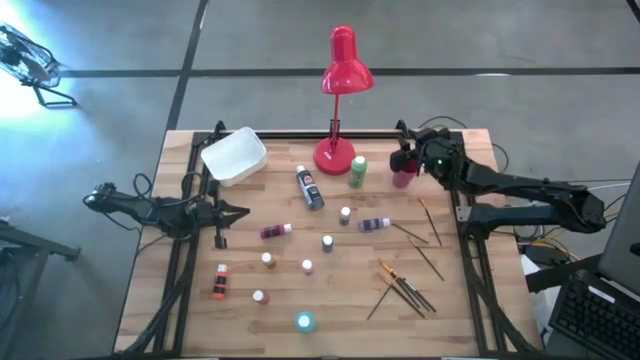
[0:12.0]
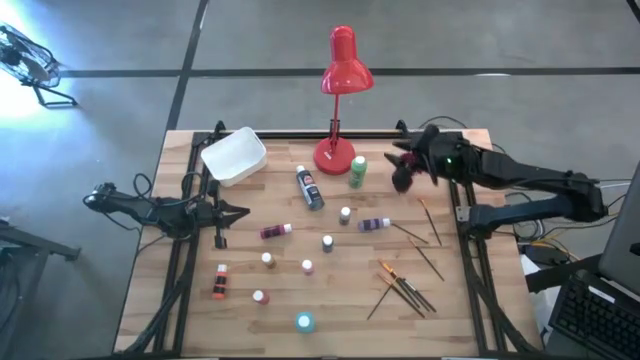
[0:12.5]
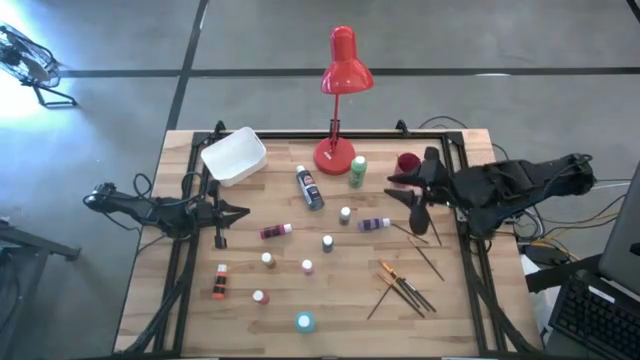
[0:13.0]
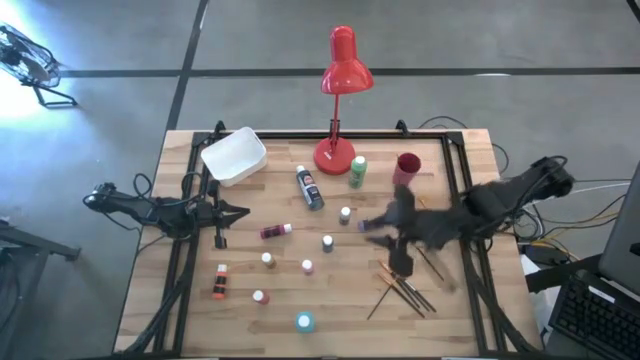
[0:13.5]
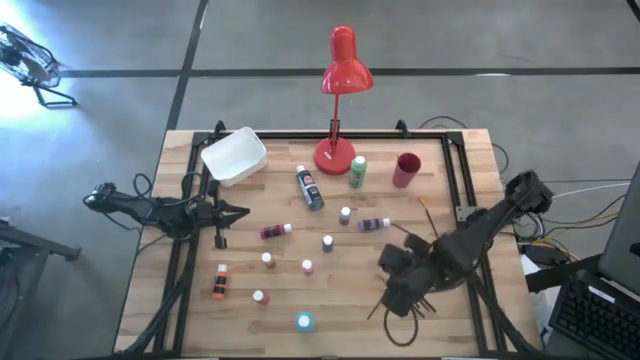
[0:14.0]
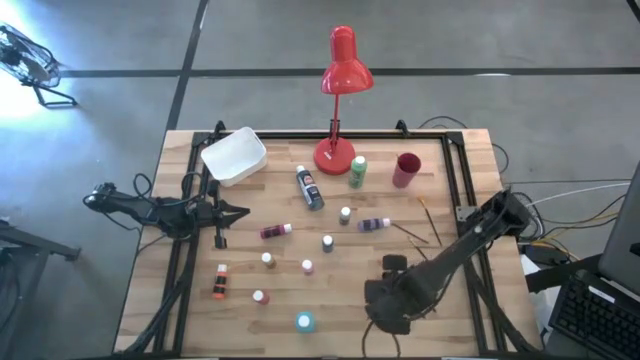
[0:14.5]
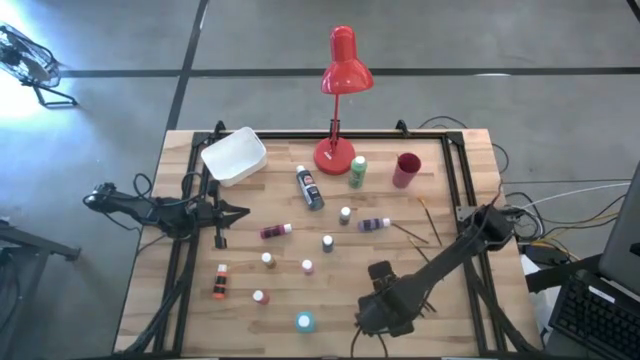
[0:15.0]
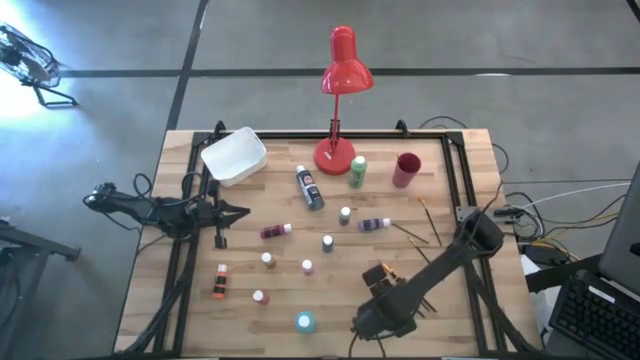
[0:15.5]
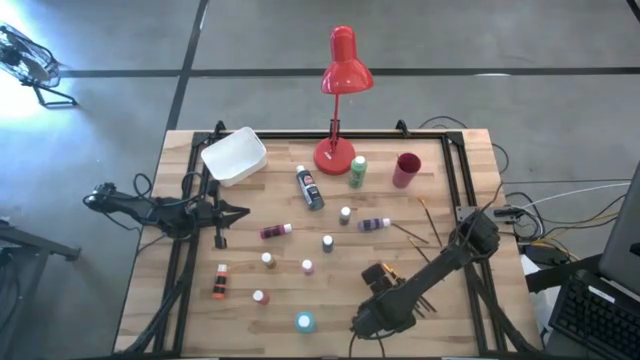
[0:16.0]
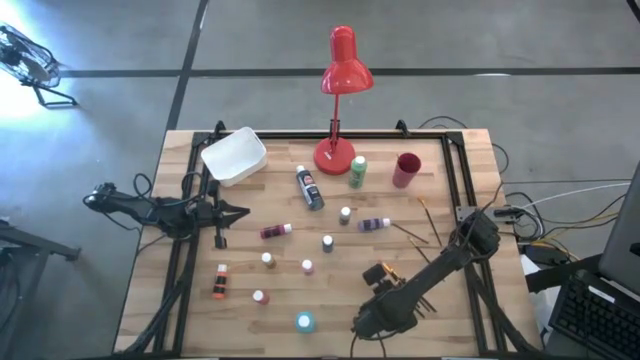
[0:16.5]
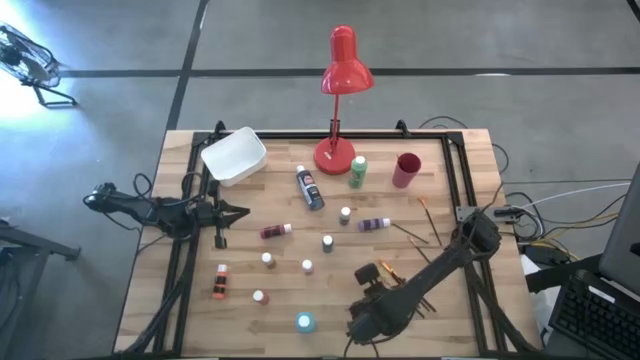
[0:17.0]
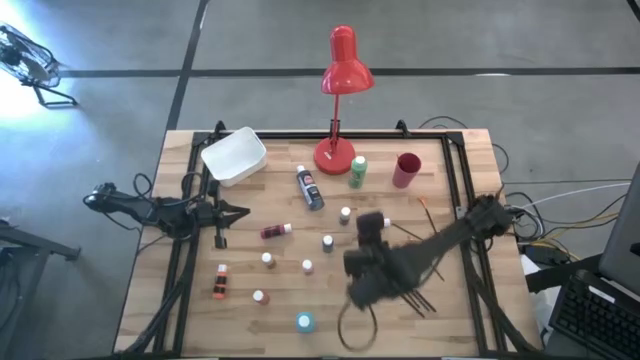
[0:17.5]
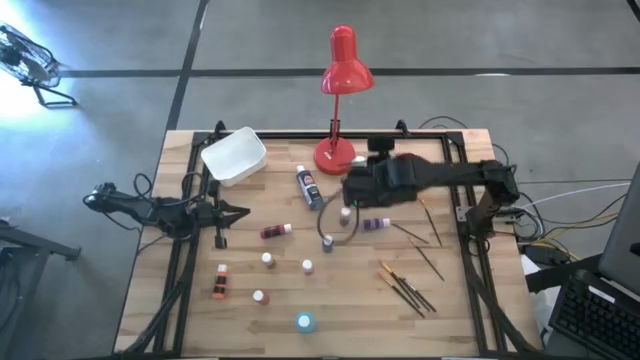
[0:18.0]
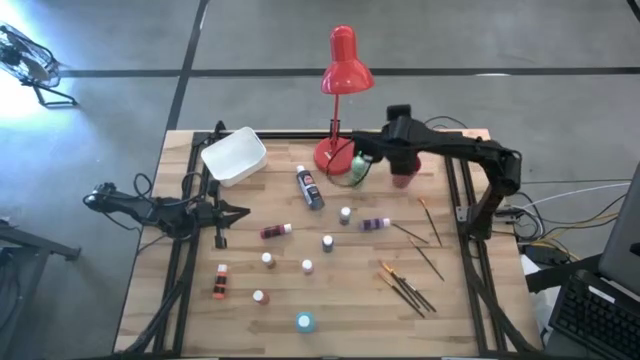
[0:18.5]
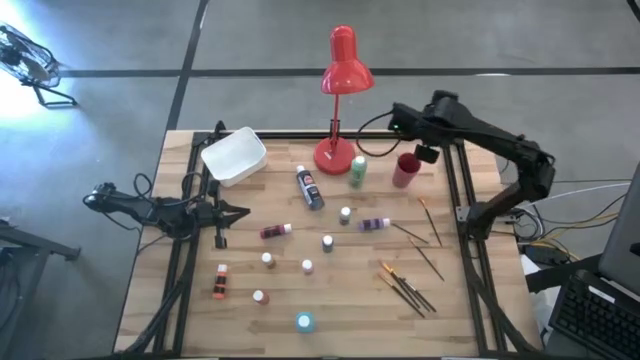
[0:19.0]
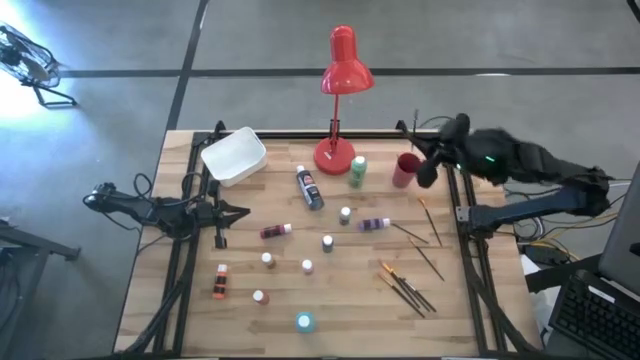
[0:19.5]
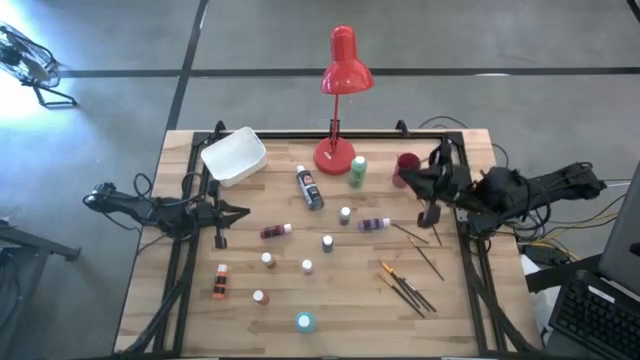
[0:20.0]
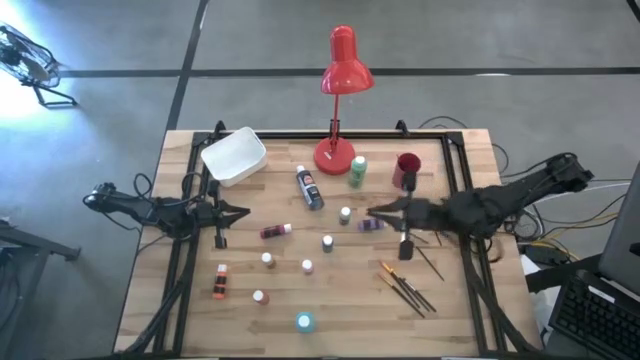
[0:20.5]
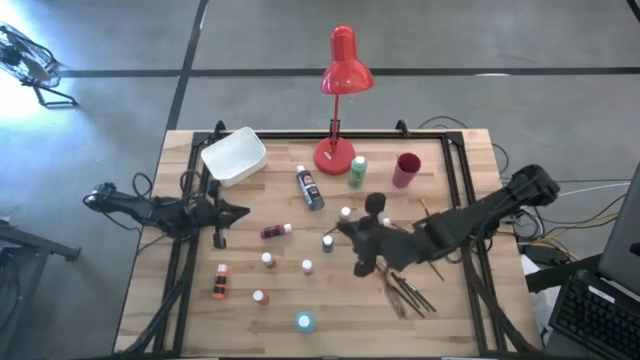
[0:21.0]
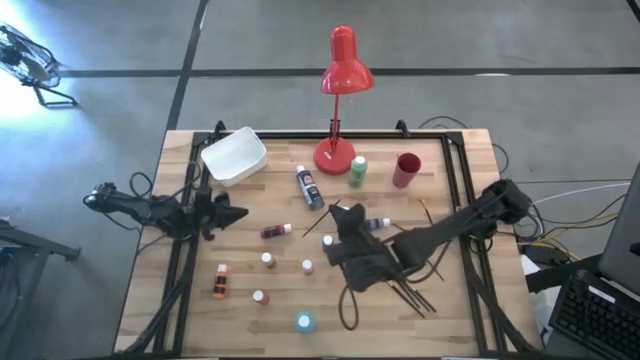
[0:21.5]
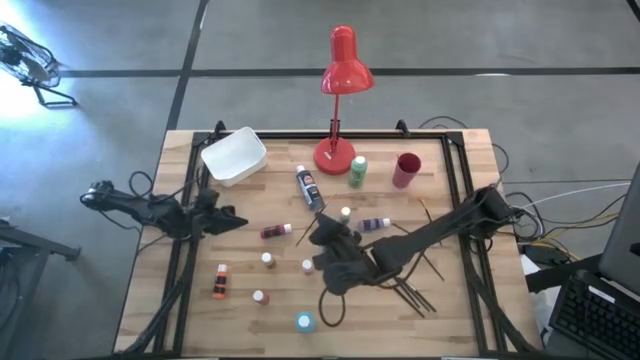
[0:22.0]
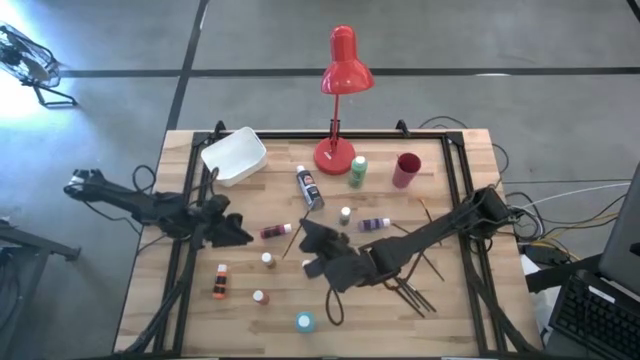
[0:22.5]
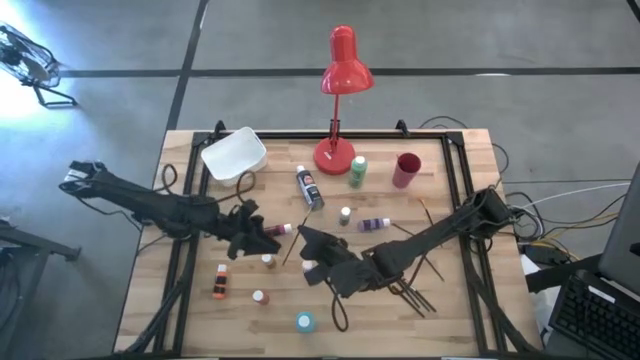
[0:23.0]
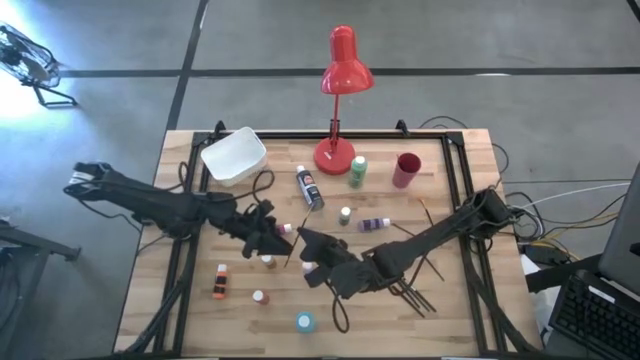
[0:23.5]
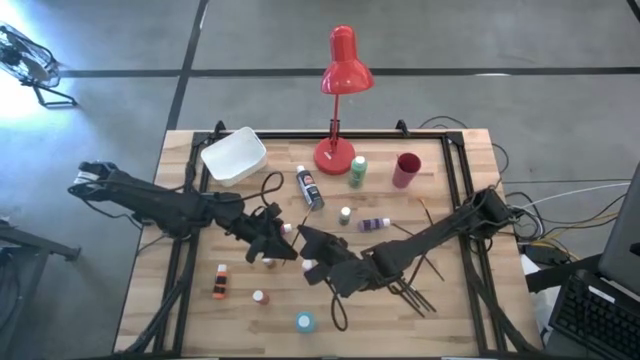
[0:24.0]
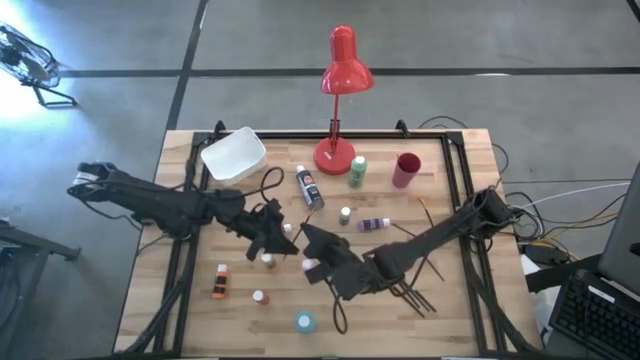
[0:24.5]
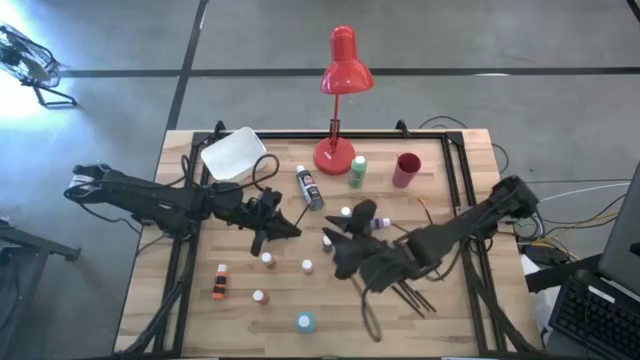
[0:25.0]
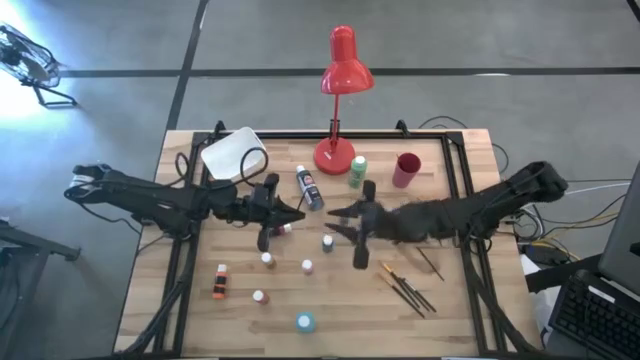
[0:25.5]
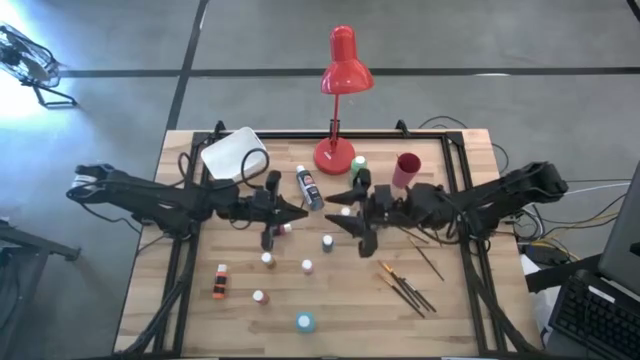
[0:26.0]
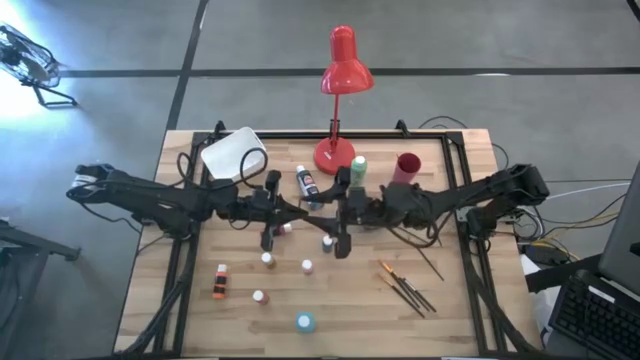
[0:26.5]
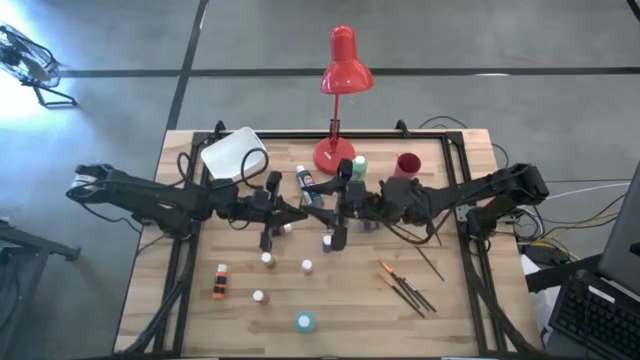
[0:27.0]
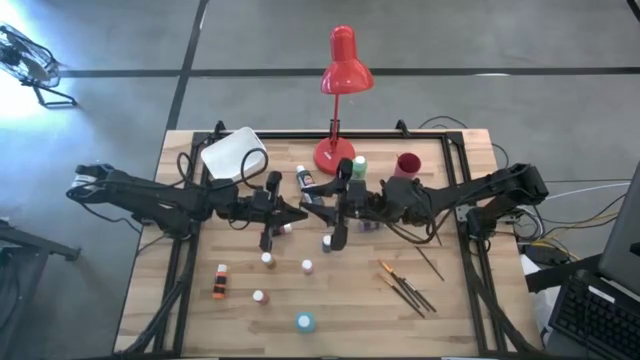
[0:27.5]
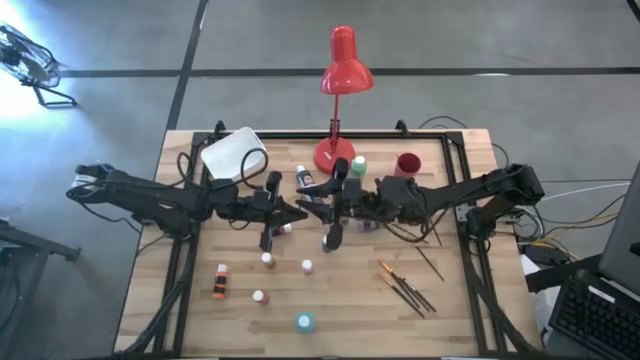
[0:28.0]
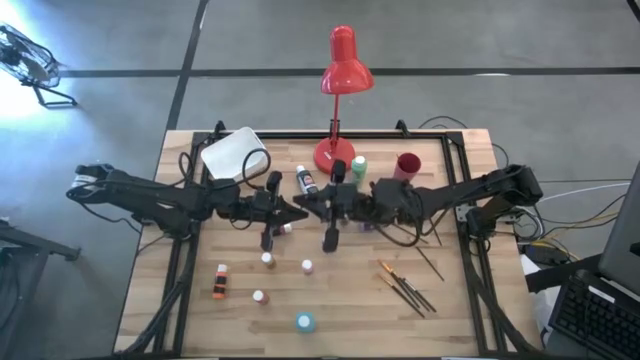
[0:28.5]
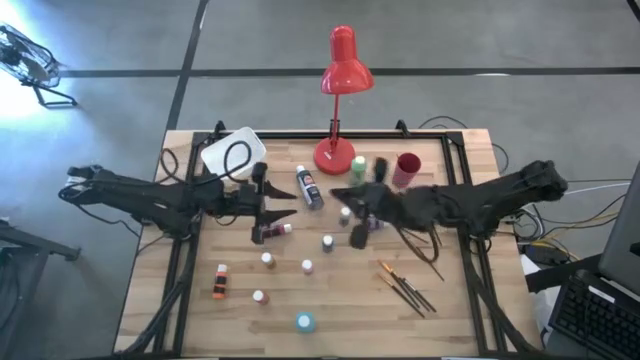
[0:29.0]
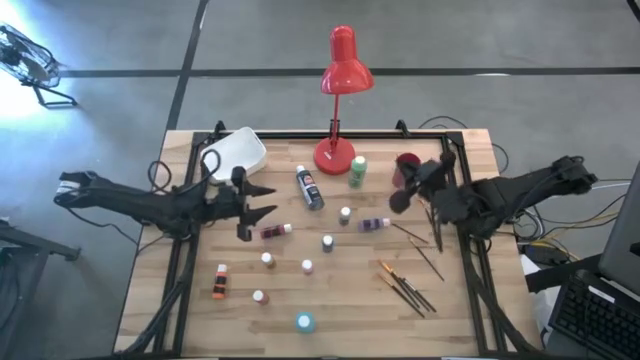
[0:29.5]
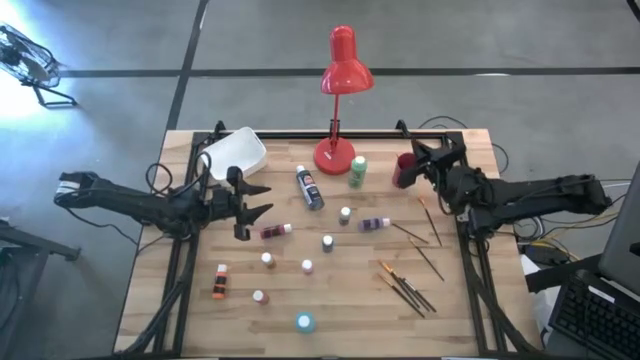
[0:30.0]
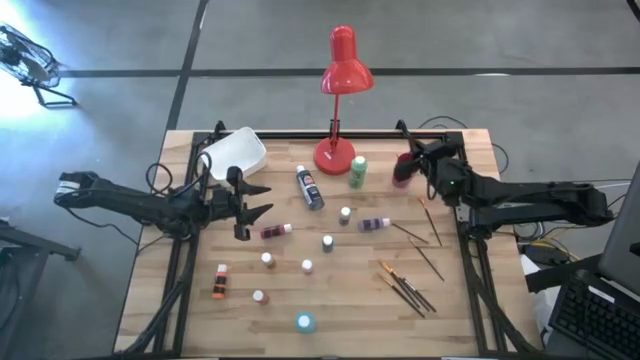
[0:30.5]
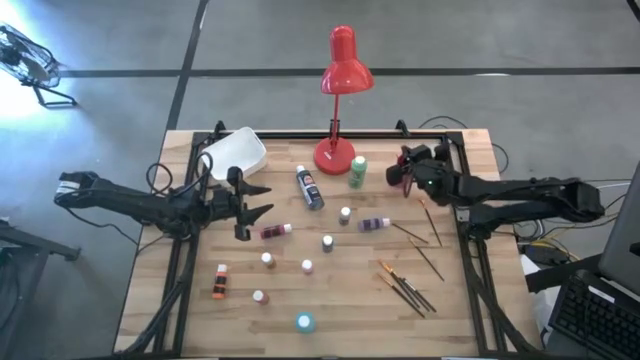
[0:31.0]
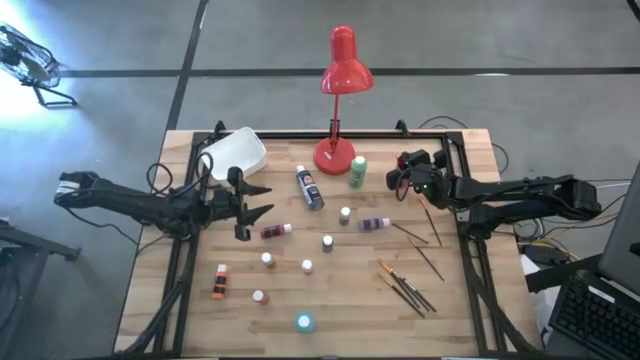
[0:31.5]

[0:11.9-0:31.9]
Task: Pick & Place Paint Supplies
Put the gold paintbrush into the pink cup
